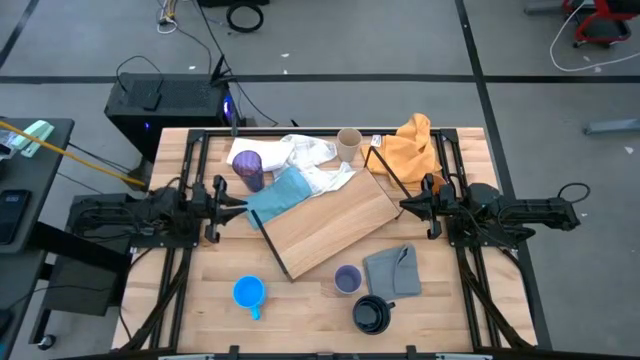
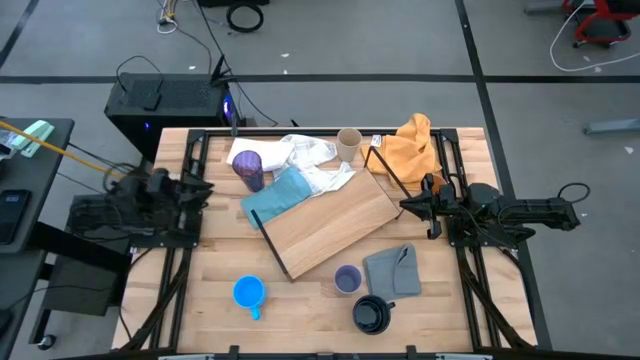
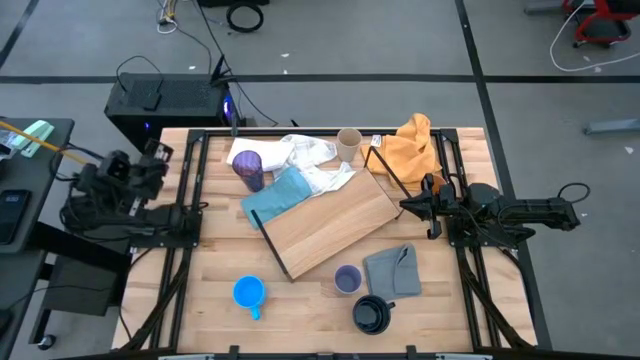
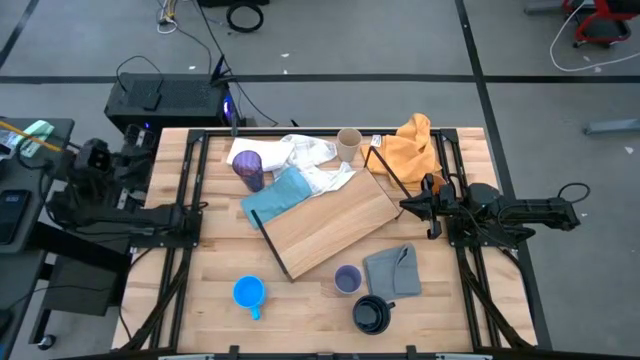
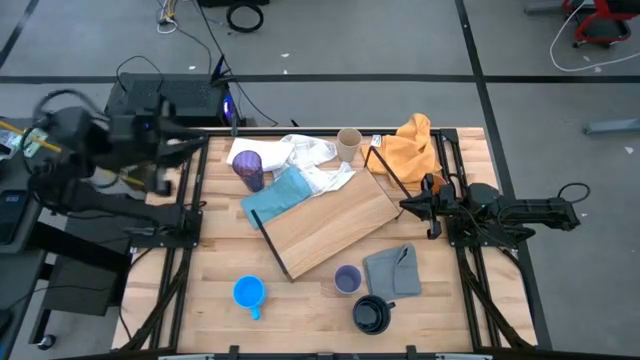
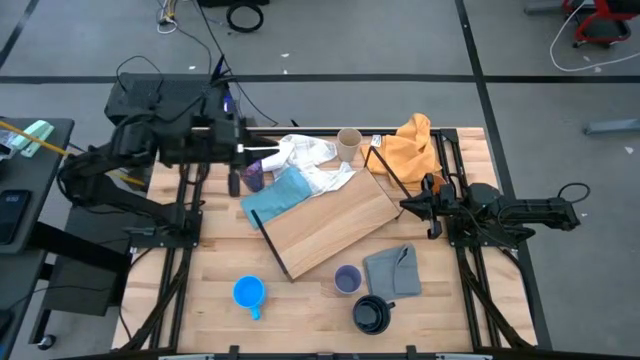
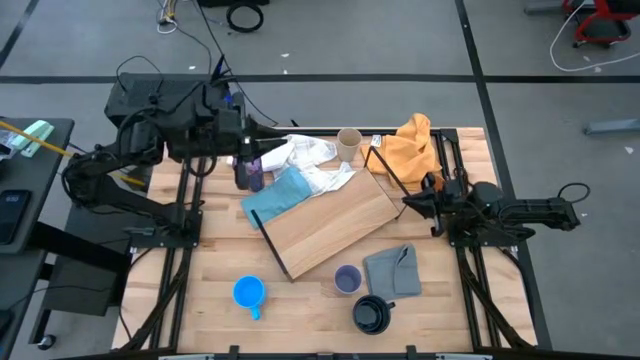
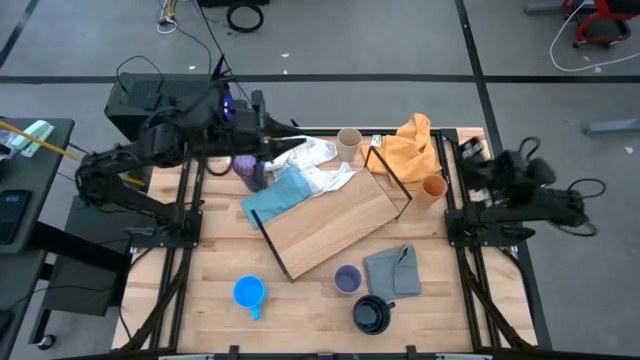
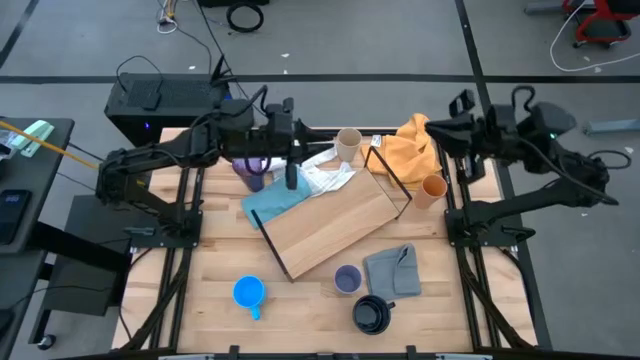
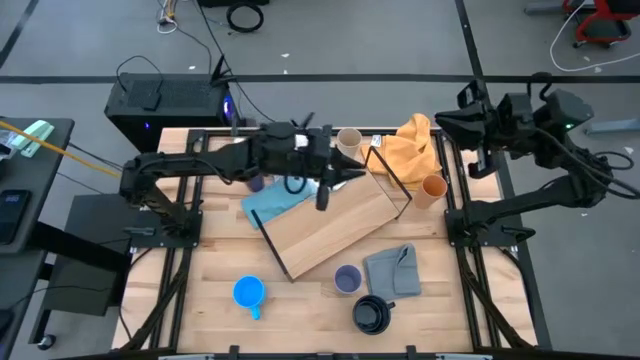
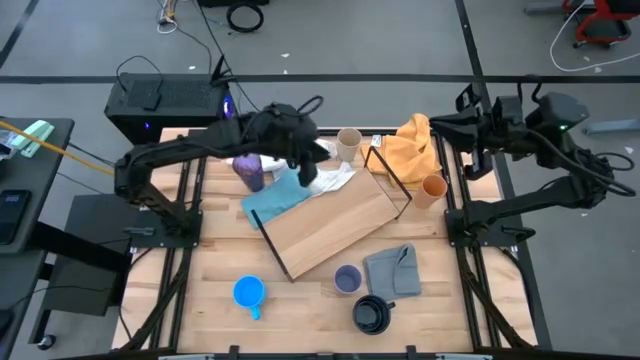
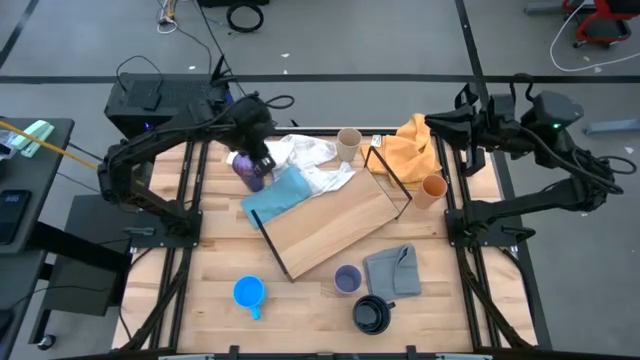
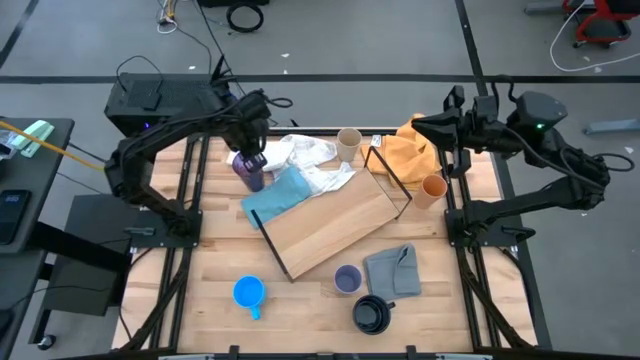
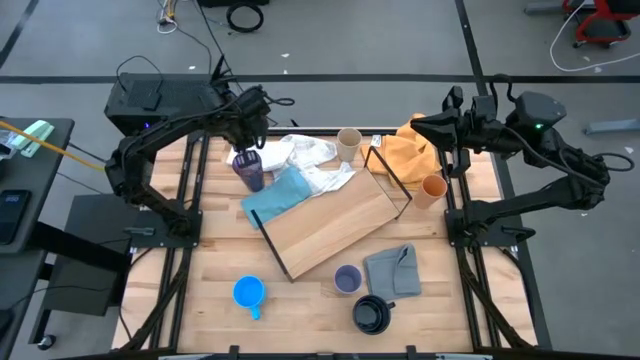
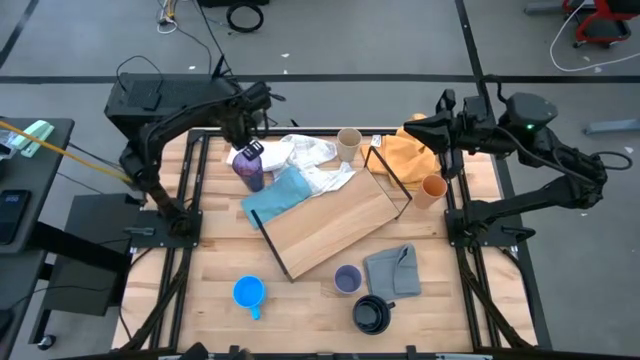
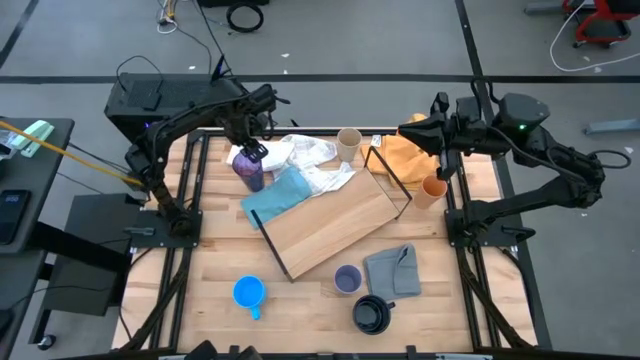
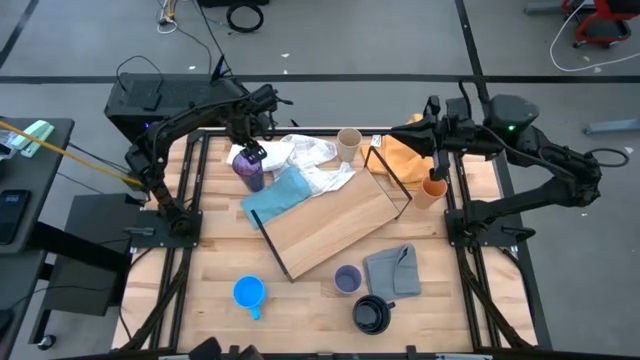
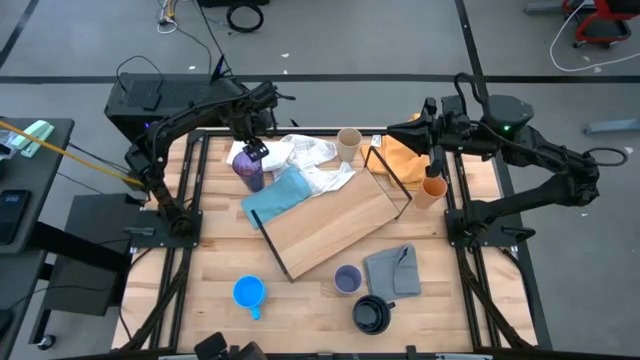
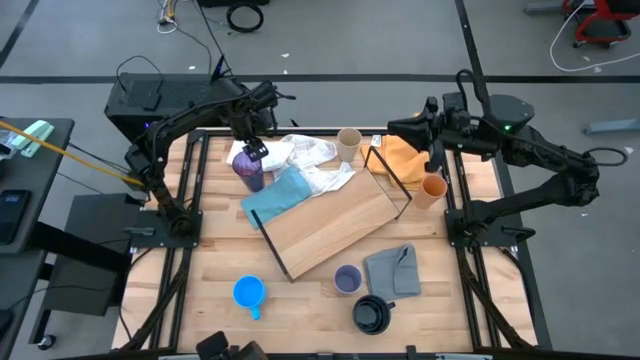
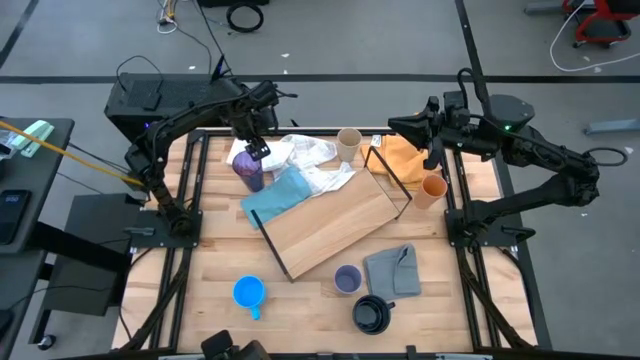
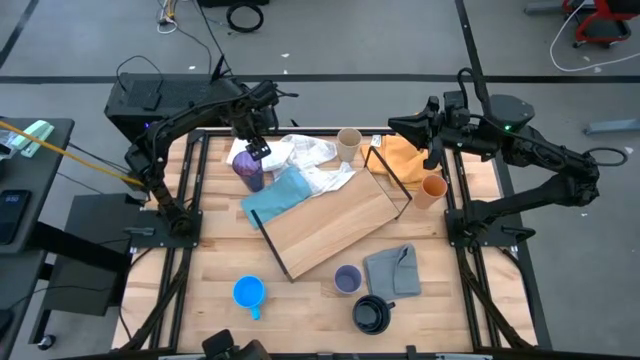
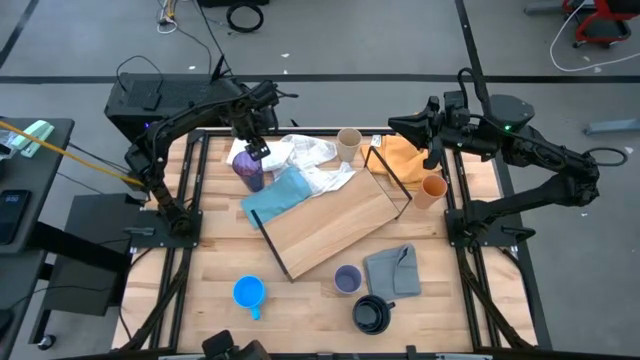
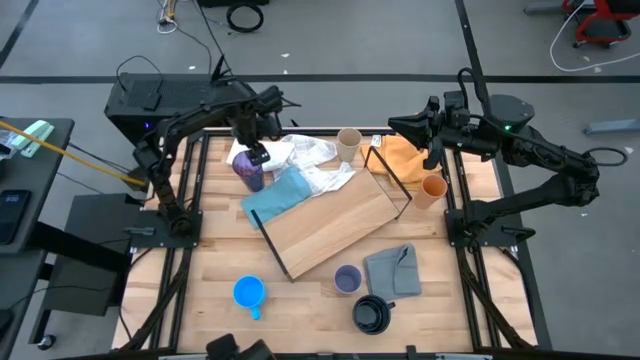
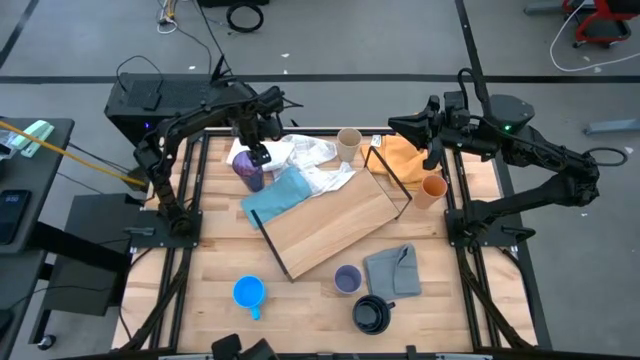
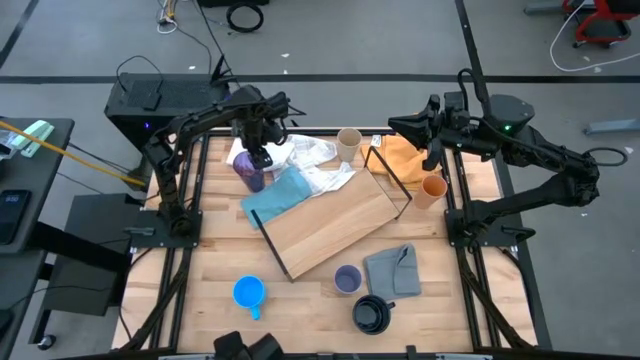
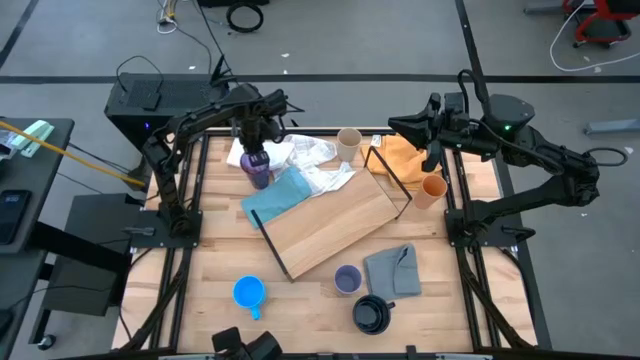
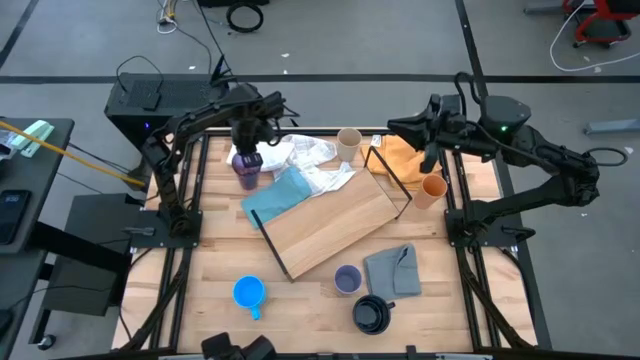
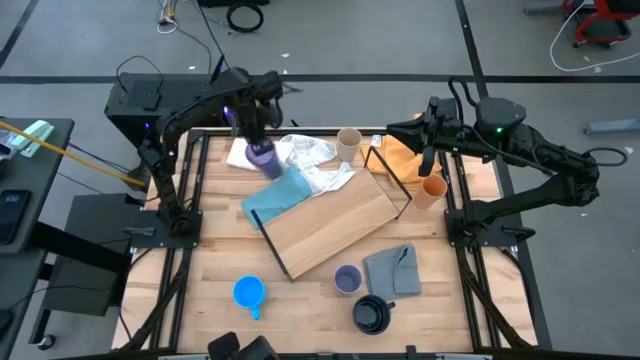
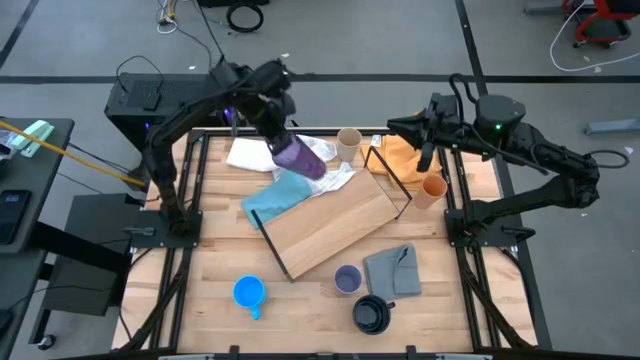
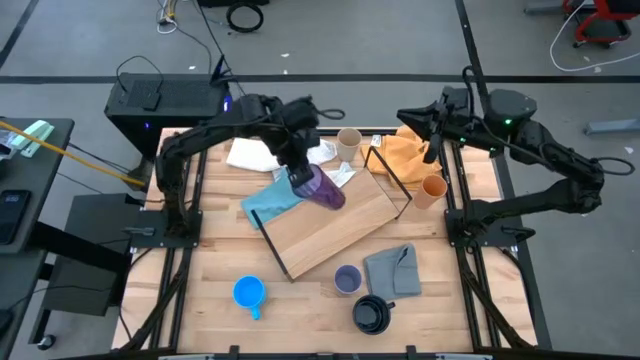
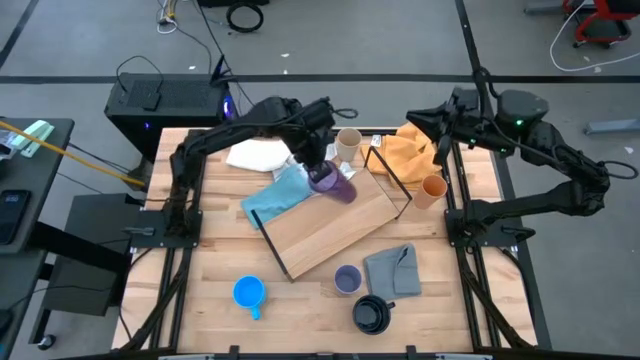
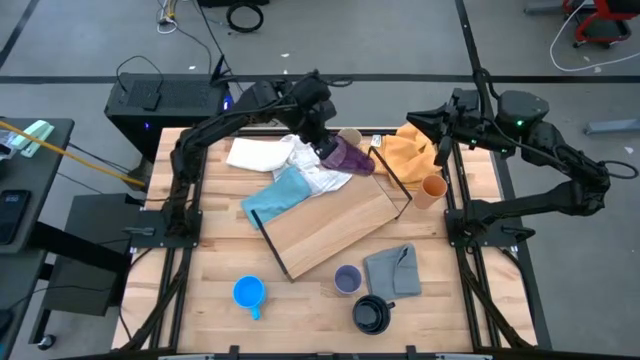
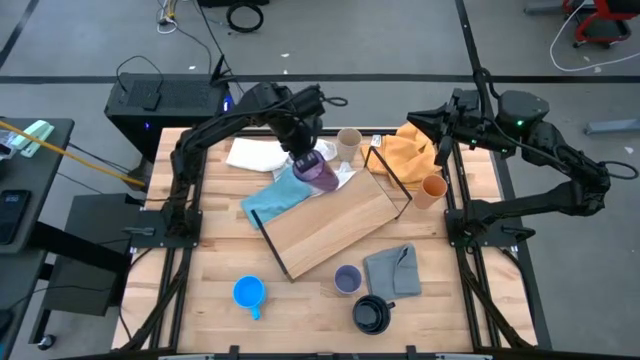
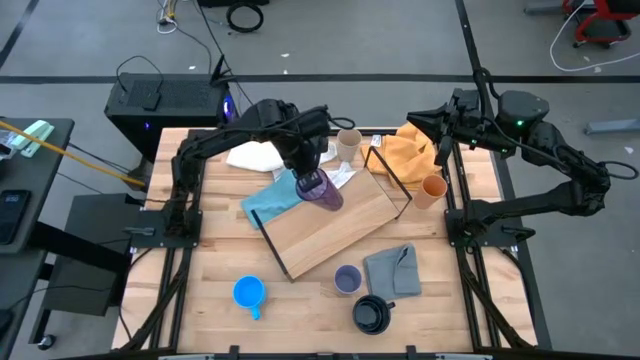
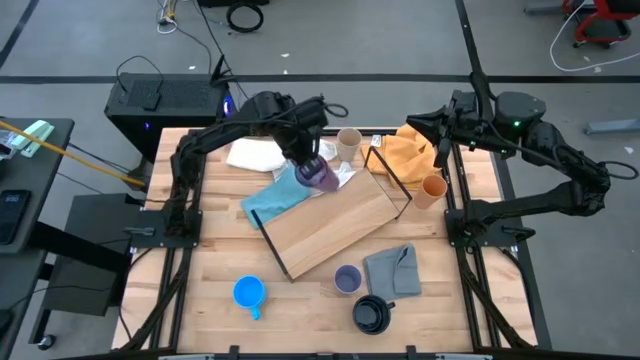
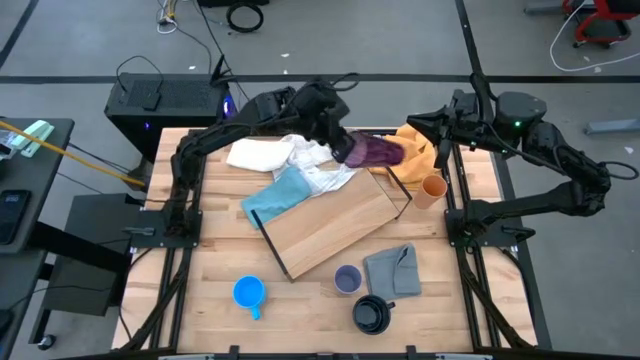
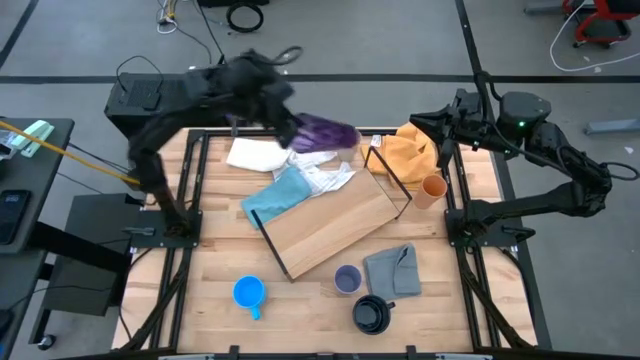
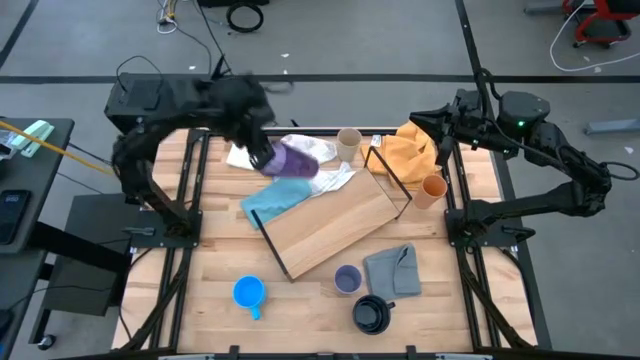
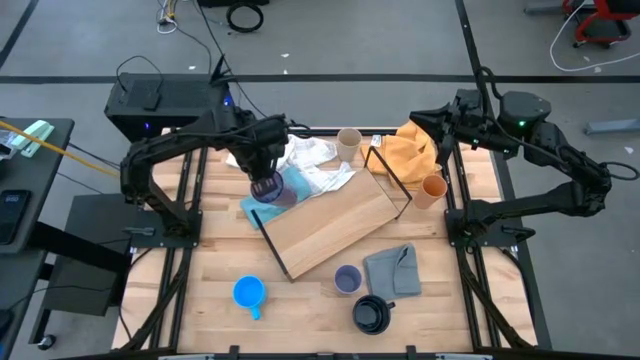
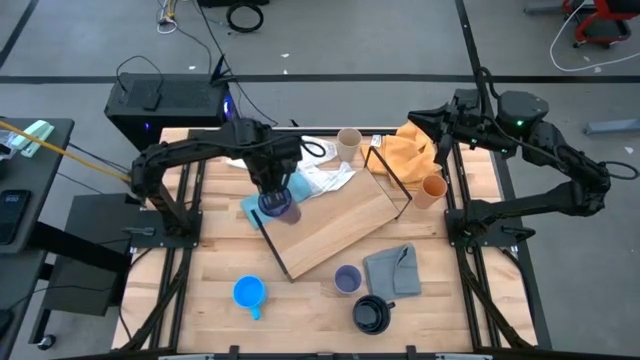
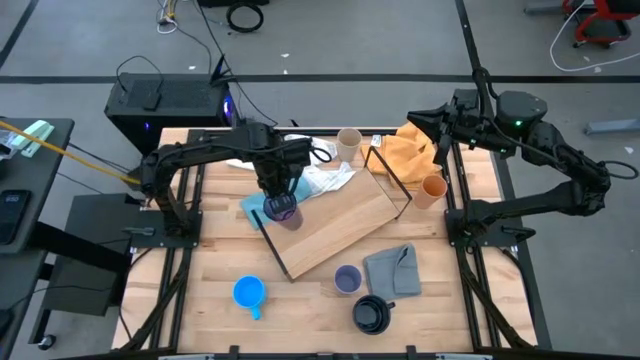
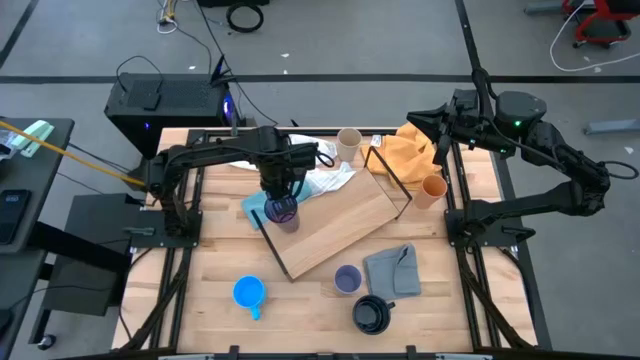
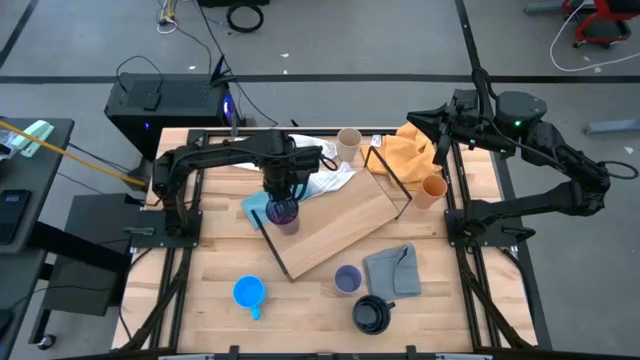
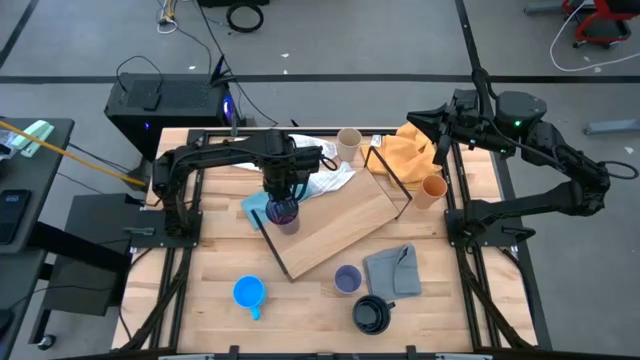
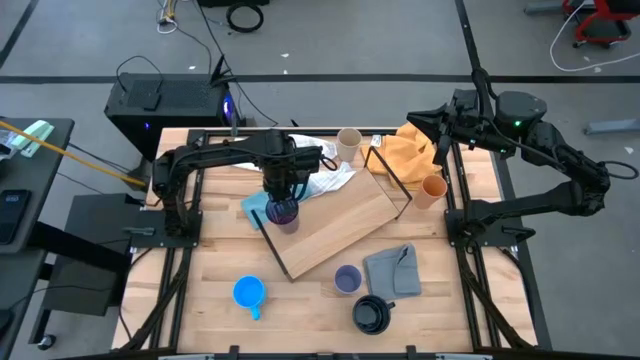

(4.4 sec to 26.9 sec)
Task: Stack small to large cups/mugs on shelf
Put the purple glass on the shelf
